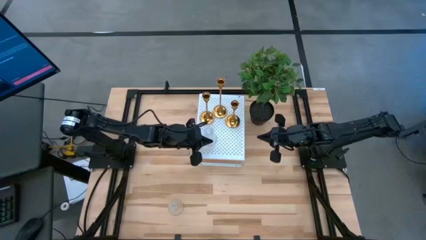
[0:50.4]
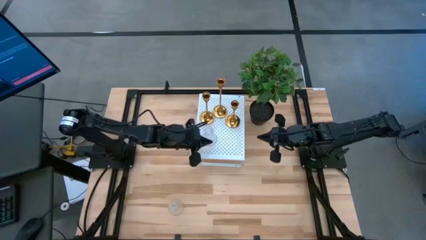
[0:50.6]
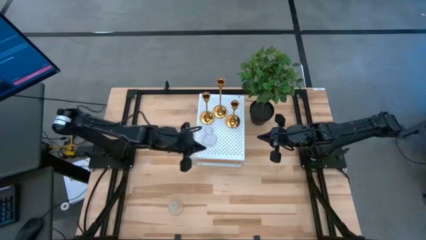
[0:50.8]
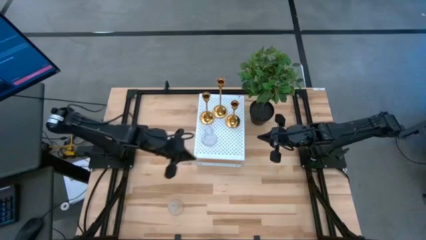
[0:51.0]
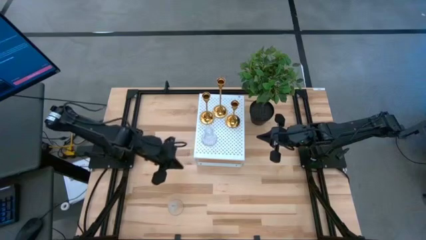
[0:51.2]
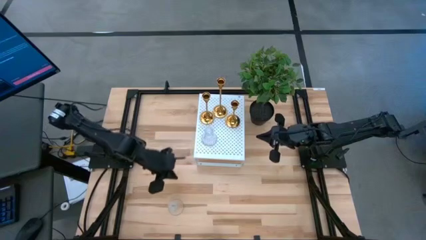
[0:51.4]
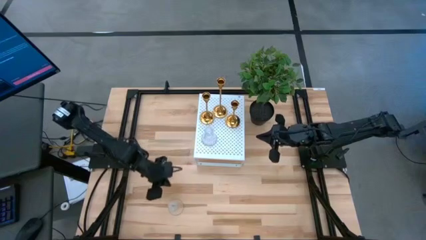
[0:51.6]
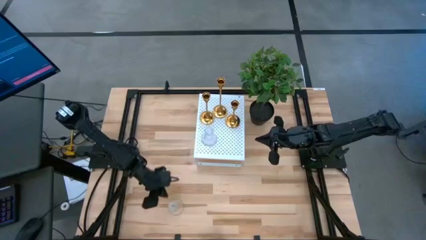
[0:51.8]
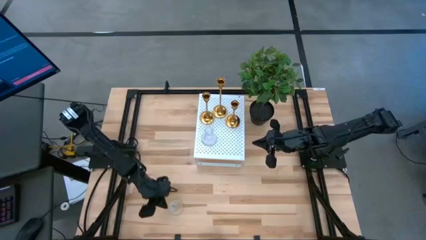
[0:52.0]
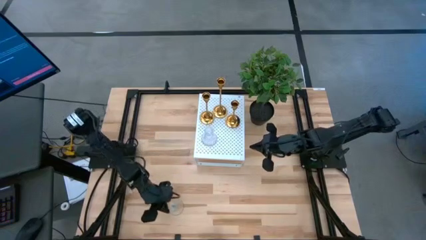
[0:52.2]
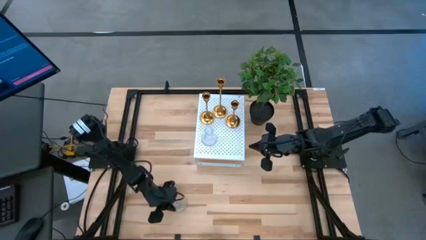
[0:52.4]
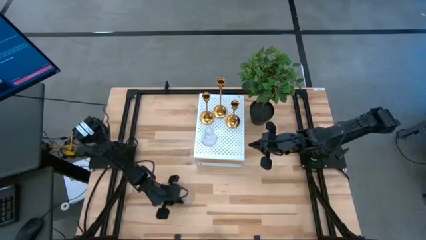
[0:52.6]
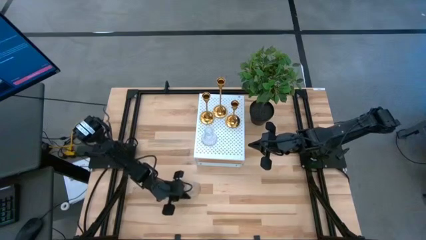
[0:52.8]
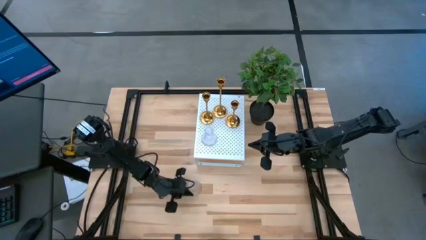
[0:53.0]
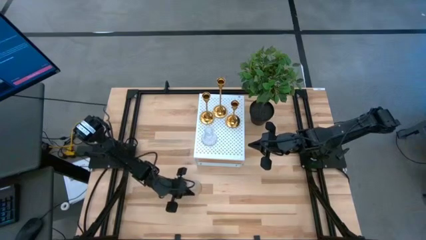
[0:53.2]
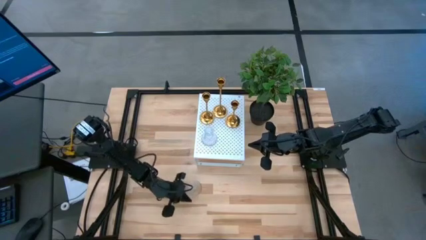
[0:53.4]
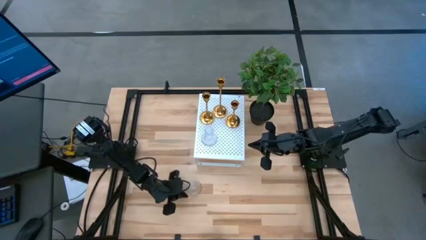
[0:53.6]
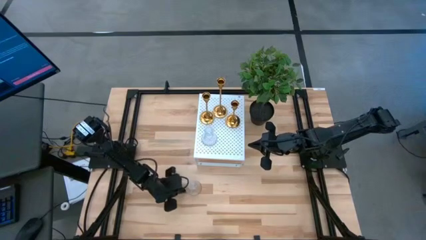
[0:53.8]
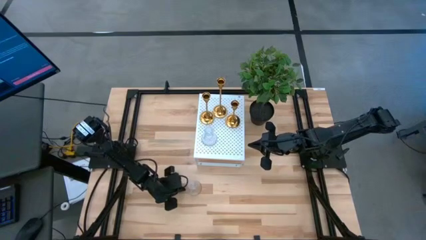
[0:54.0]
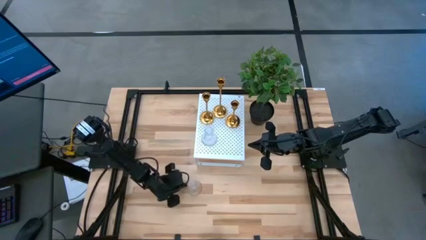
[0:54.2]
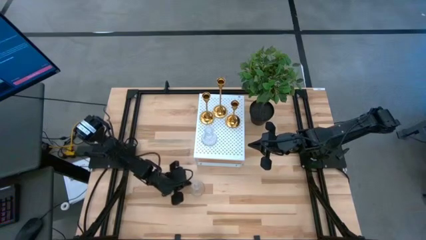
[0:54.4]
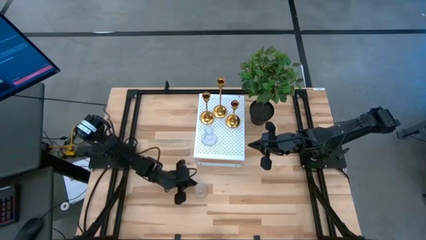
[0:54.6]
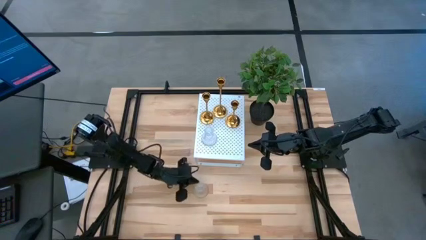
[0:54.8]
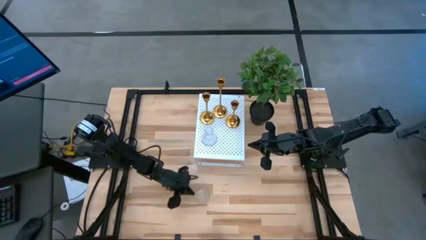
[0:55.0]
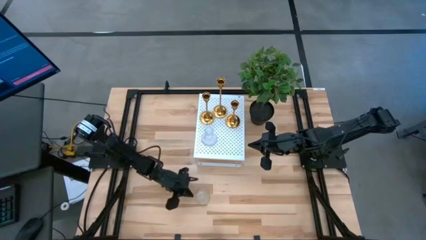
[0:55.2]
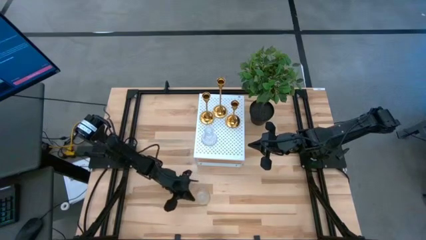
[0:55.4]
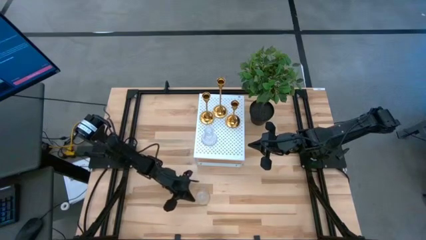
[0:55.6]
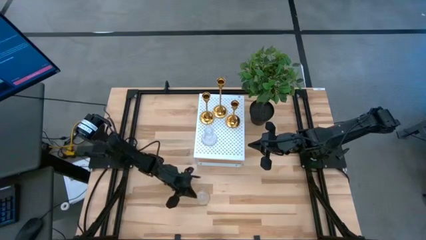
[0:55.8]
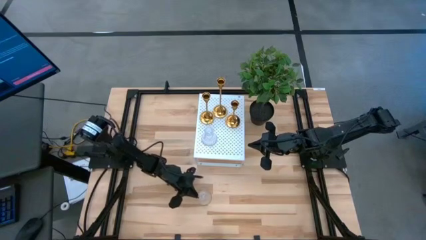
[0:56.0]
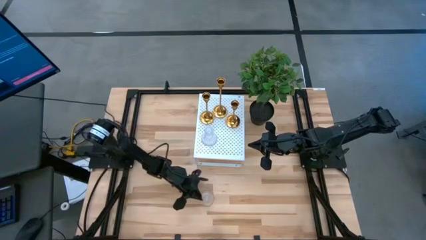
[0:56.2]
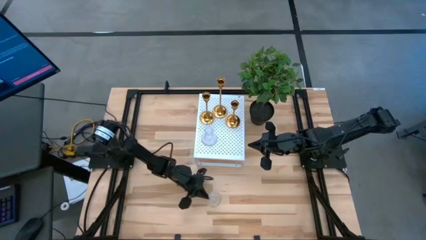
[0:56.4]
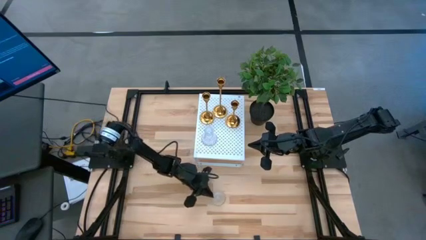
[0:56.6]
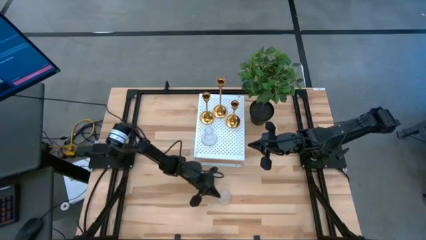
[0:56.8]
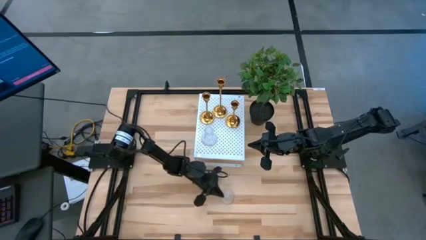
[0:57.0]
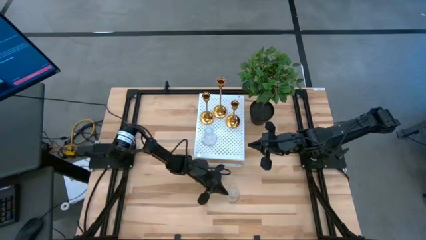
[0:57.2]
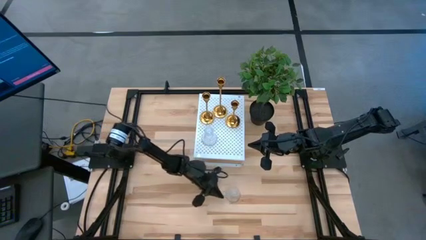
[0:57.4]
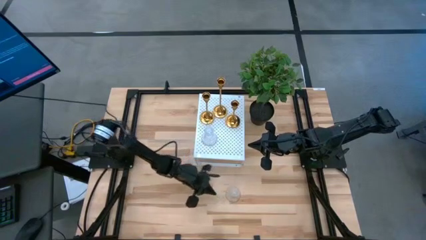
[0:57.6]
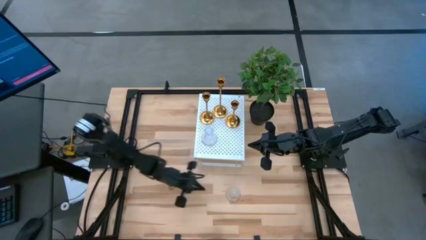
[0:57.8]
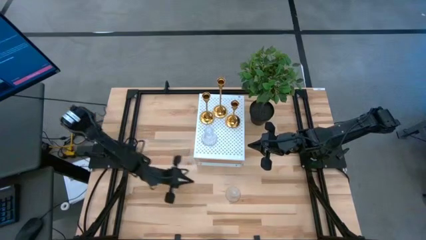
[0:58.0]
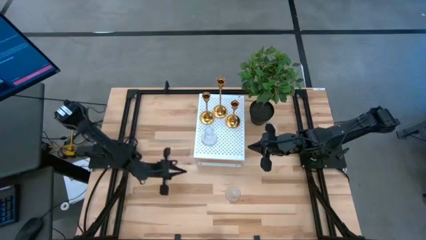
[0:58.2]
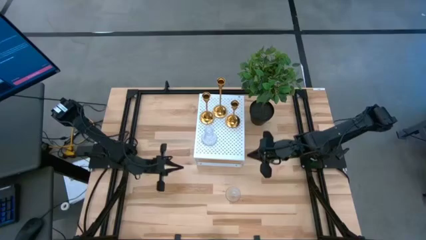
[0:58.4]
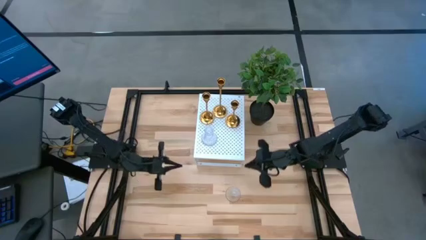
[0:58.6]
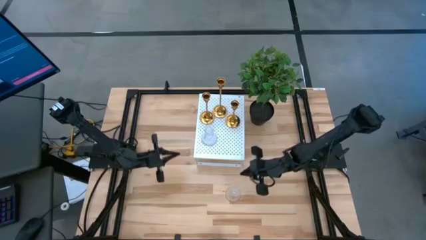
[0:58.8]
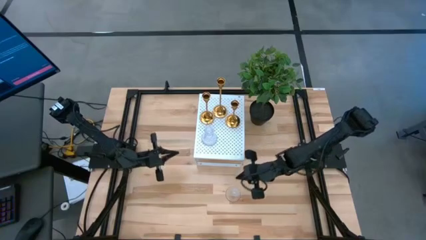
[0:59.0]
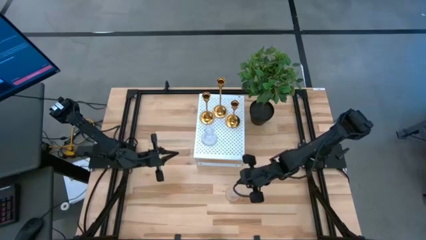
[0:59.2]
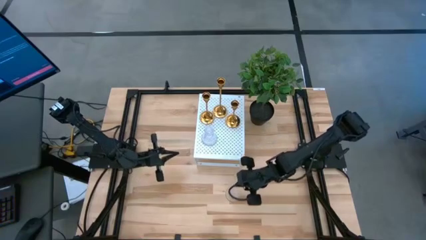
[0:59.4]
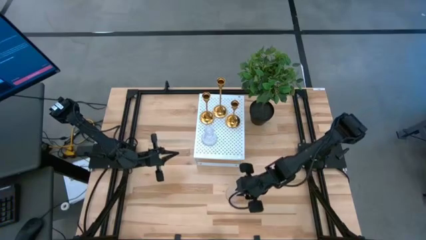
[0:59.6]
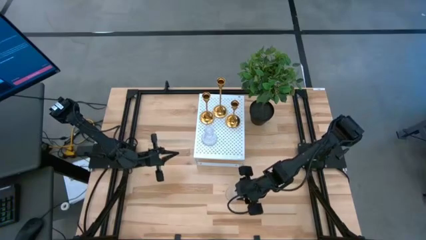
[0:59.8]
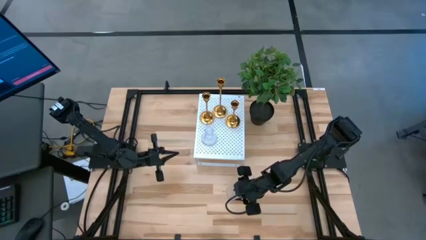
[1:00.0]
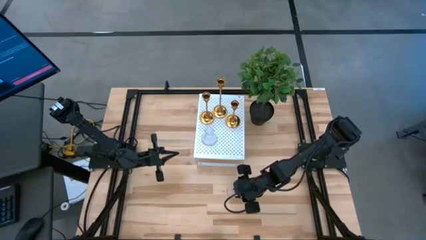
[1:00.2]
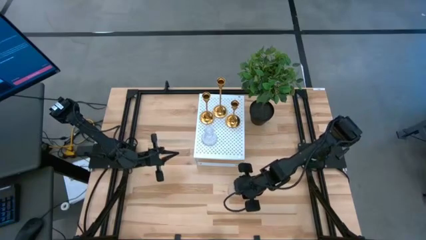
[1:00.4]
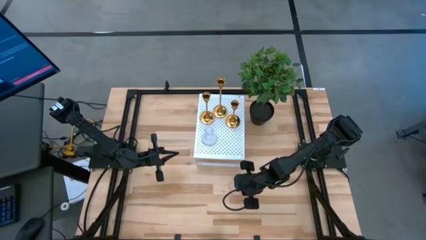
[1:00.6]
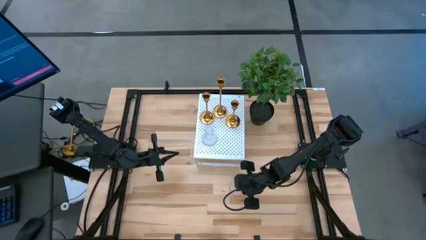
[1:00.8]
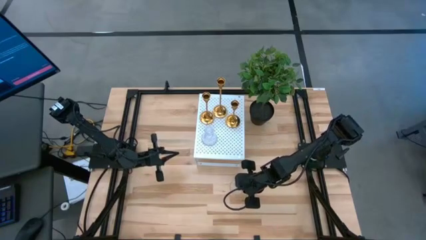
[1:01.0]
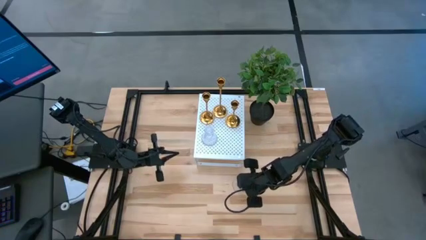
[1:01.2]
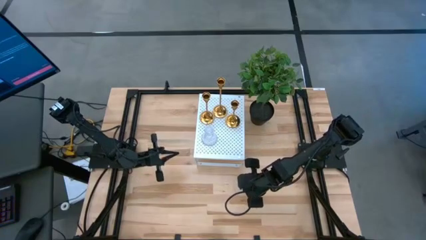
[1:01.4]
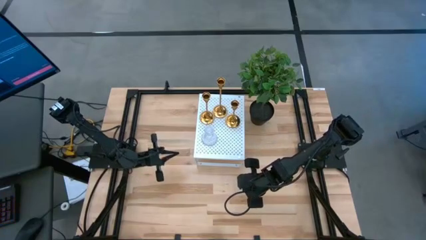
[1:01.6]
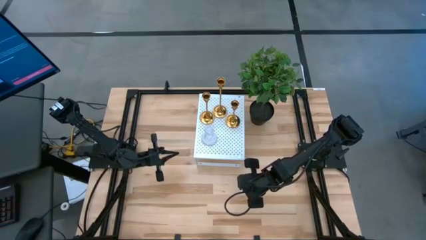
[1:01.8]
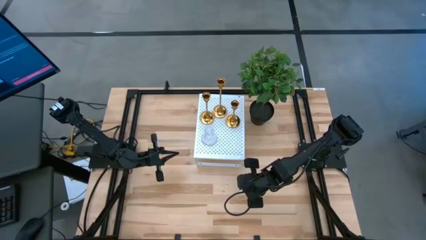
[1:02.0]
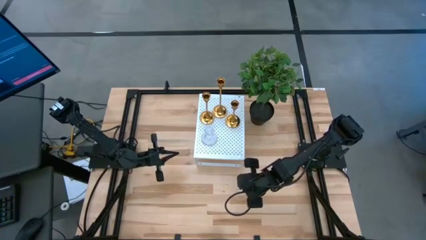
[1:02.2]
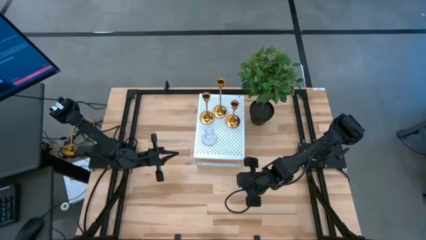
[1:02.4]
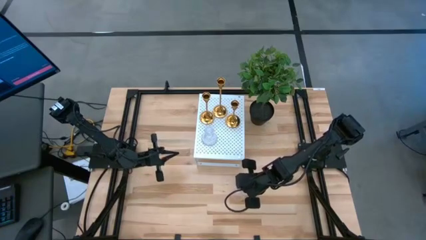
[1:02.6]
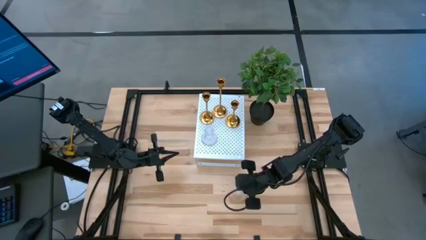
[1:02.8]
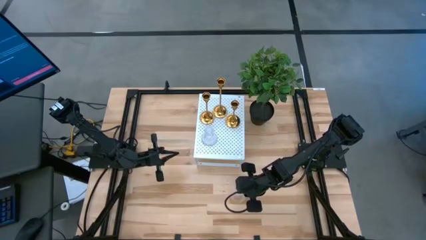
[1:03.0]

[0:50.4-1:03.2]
Task: Pick & Place candle stick holders
Put the transparent candle holder on the shelf

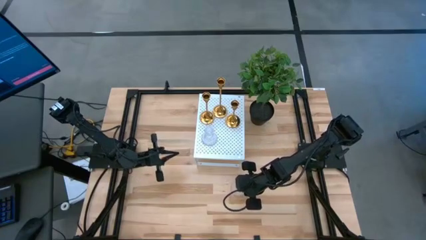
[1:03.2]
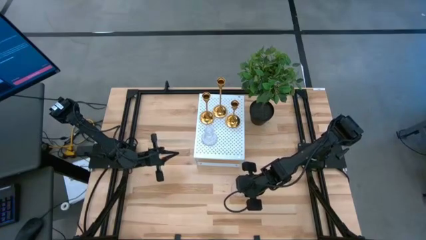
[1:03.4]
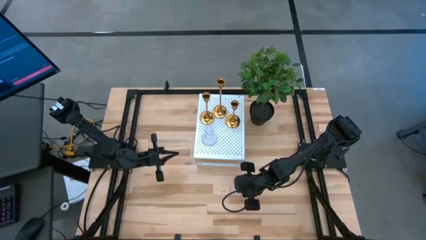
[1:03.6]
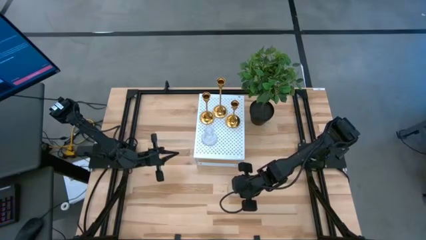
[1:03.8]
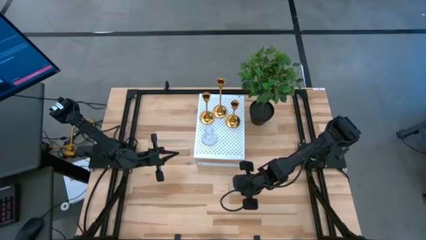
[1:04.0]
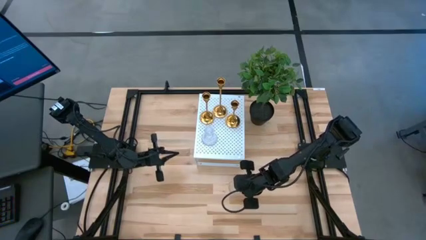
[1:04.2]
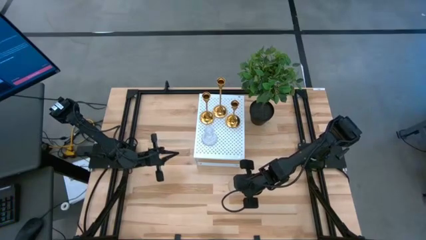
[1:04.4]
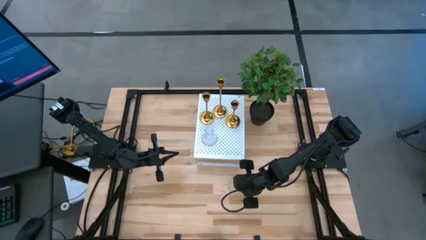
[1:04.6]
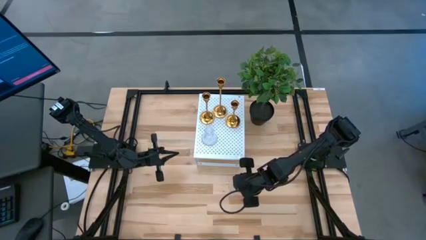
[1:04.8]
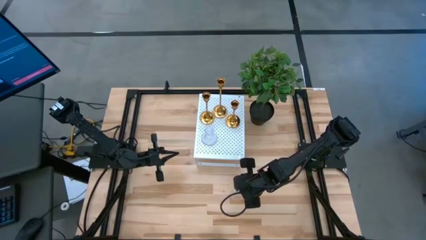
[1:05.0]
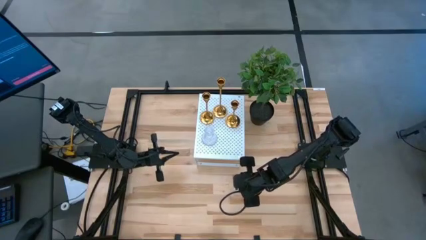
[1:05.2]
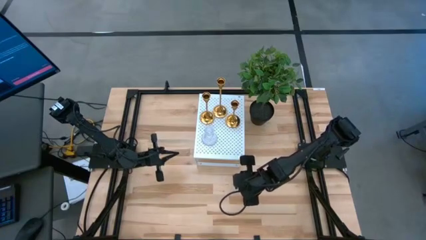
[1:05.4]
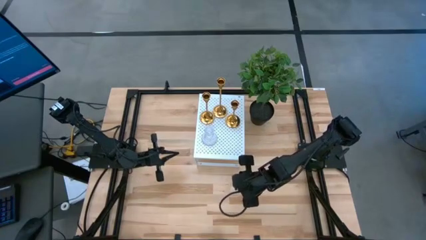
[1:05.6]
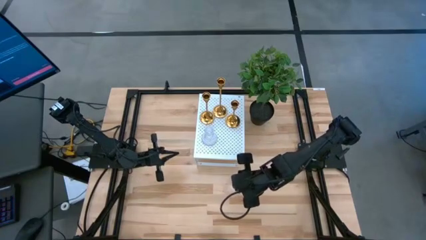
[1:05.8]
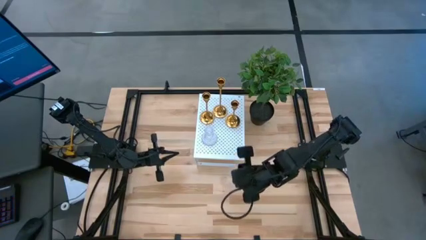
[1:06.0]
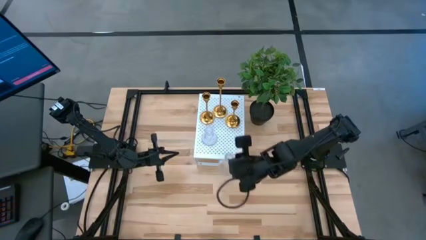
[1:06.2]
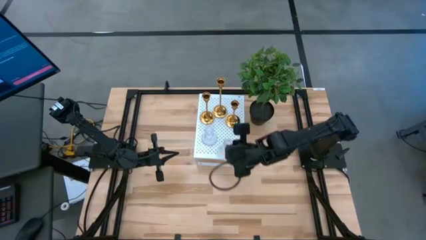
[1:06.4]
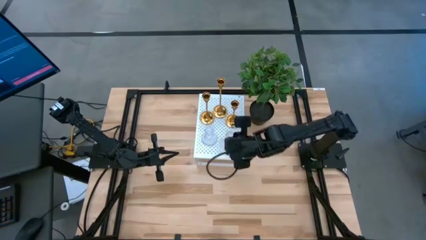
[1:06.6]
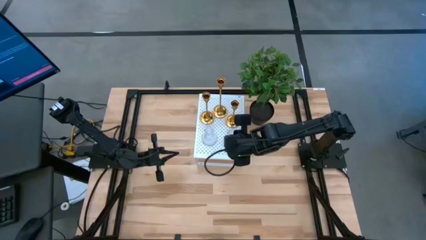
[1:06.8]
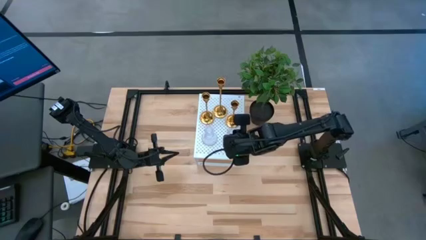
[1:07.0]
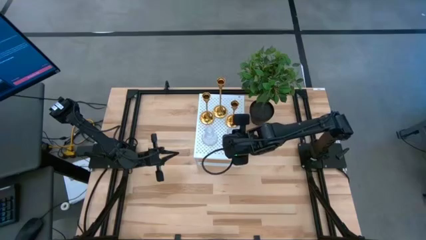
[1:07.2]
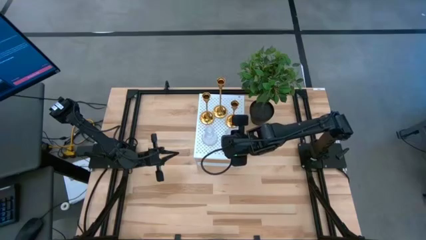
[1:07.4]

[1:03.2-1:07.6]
Align the transparent candle holder with the transparent candle holder on the shelf
